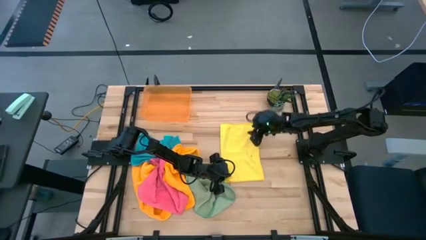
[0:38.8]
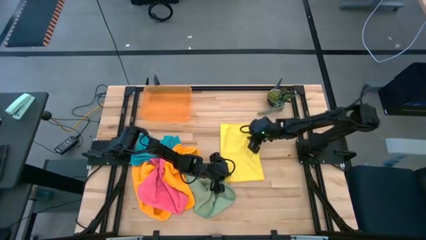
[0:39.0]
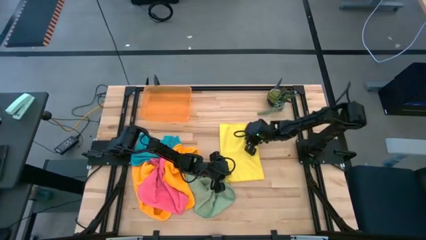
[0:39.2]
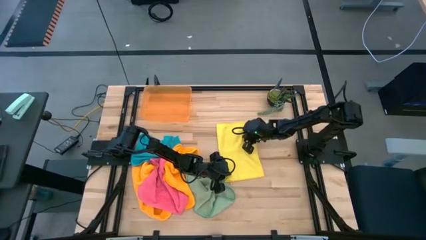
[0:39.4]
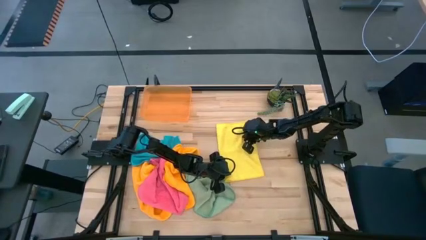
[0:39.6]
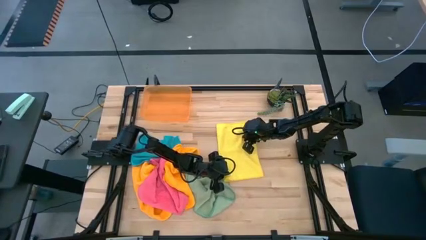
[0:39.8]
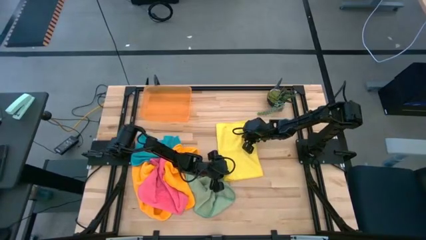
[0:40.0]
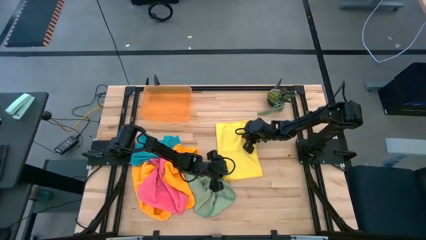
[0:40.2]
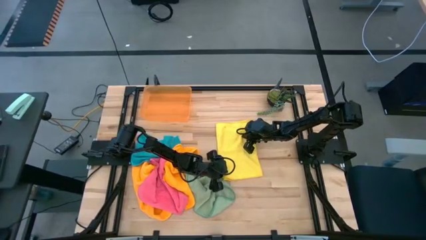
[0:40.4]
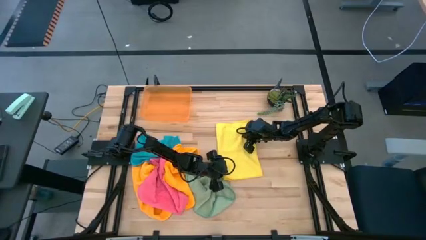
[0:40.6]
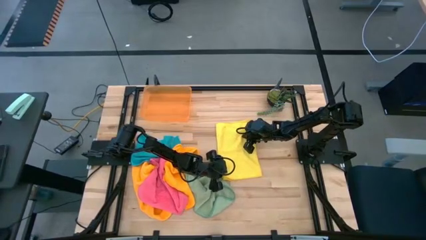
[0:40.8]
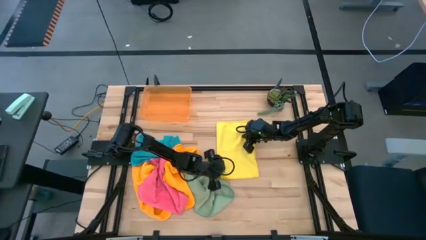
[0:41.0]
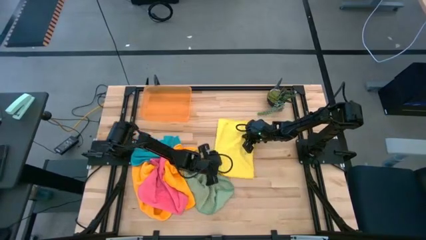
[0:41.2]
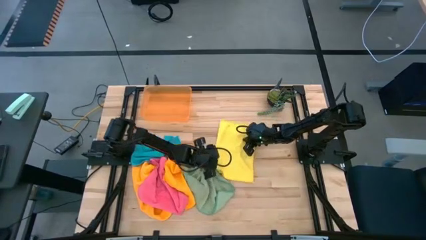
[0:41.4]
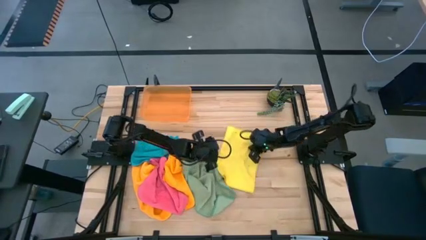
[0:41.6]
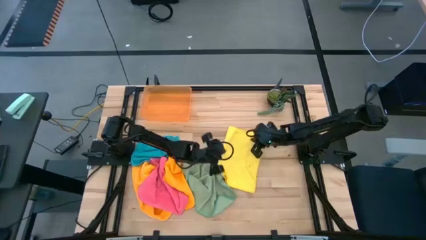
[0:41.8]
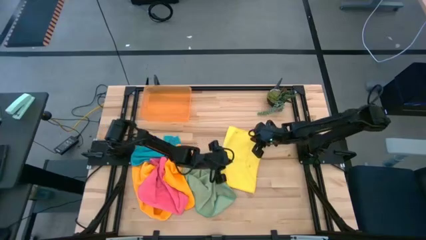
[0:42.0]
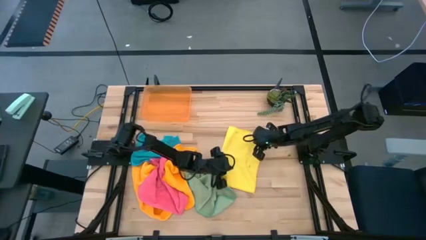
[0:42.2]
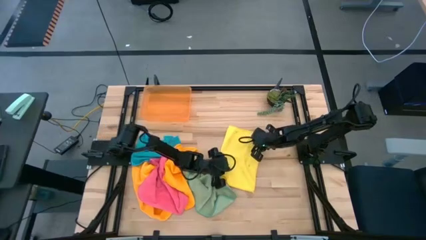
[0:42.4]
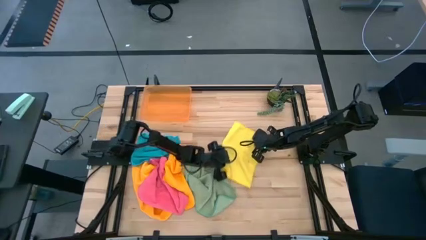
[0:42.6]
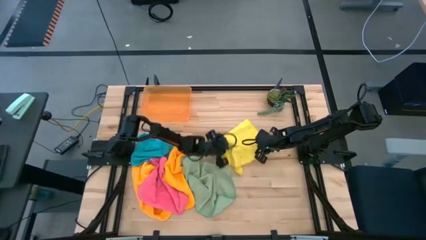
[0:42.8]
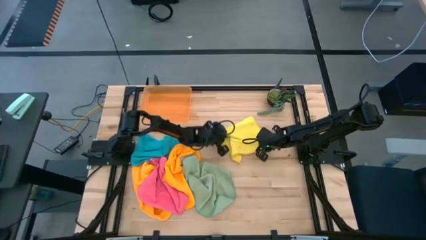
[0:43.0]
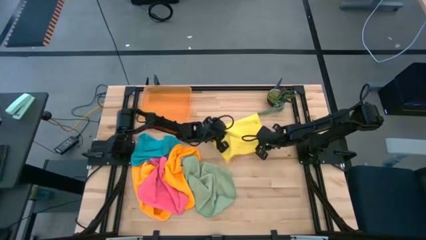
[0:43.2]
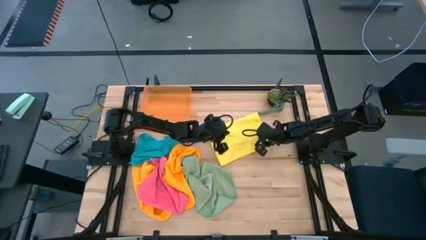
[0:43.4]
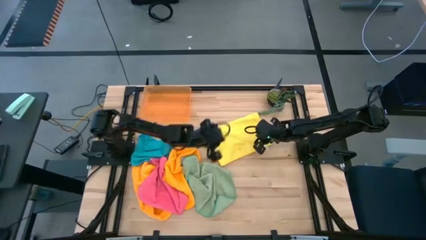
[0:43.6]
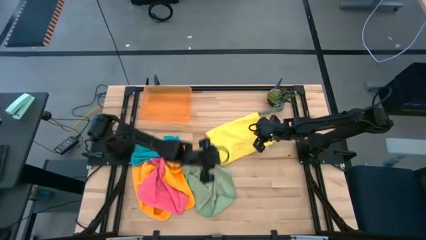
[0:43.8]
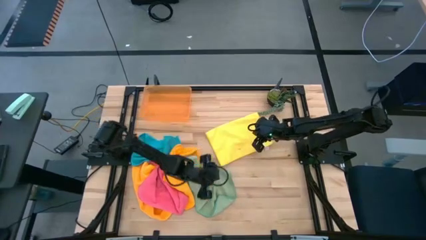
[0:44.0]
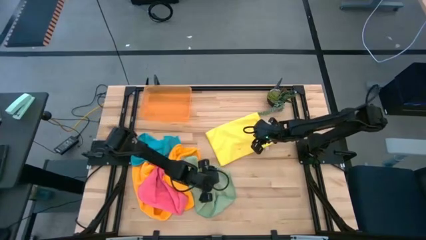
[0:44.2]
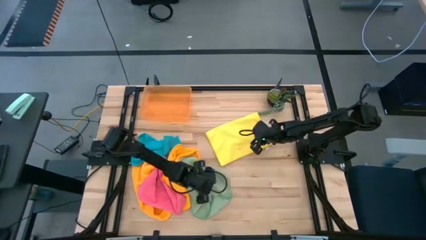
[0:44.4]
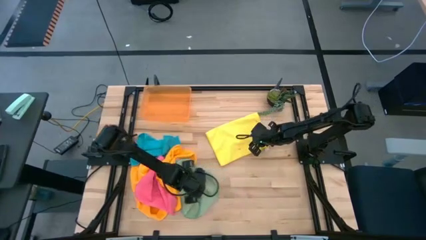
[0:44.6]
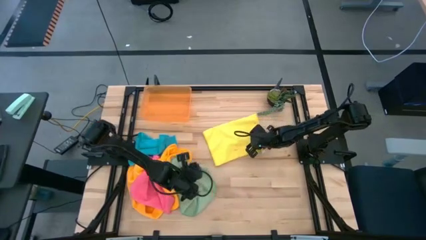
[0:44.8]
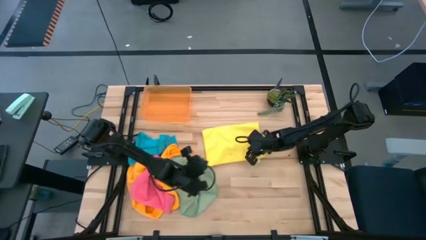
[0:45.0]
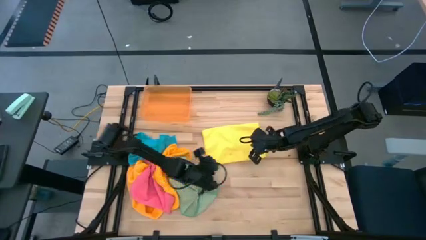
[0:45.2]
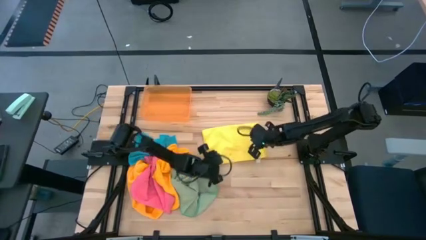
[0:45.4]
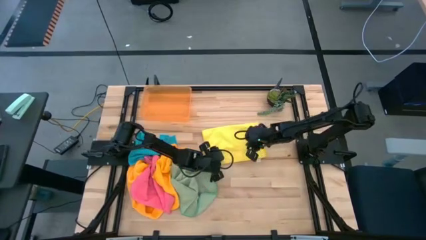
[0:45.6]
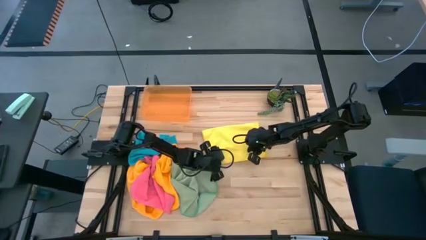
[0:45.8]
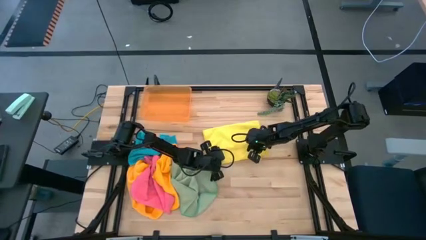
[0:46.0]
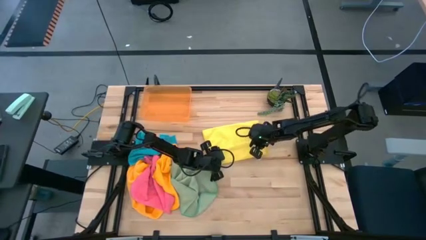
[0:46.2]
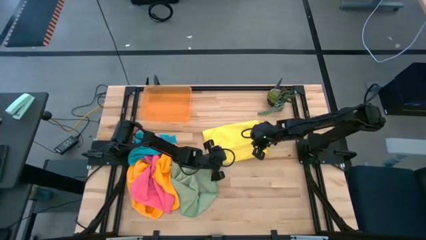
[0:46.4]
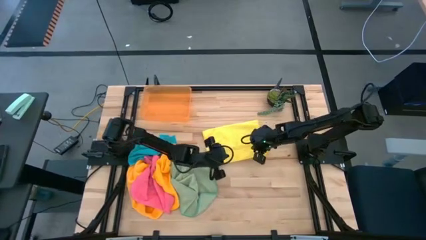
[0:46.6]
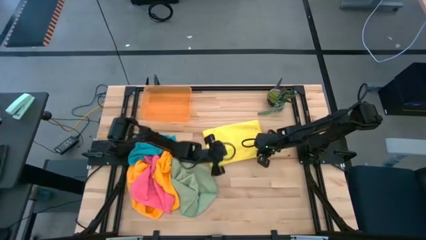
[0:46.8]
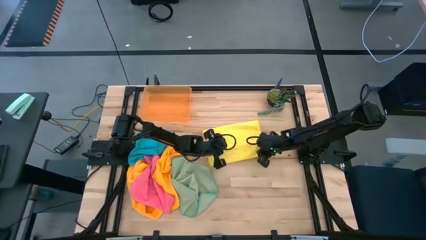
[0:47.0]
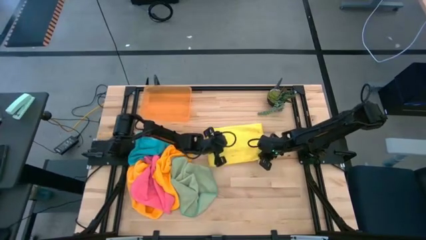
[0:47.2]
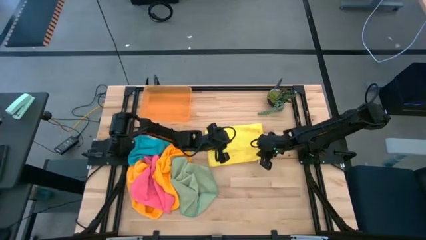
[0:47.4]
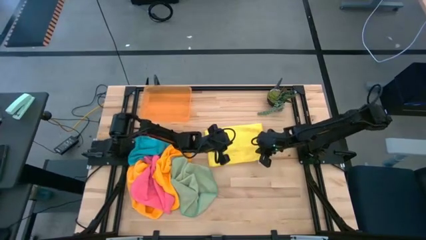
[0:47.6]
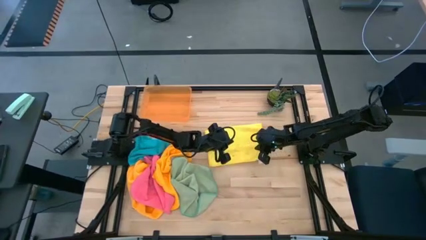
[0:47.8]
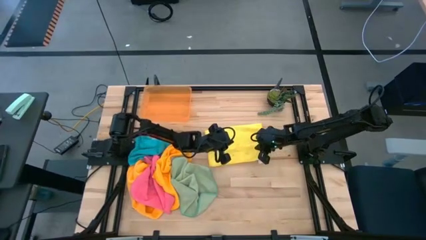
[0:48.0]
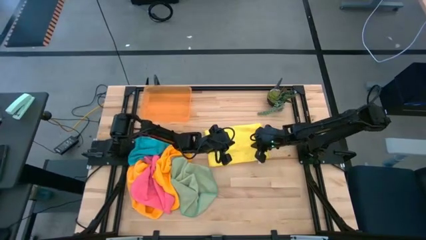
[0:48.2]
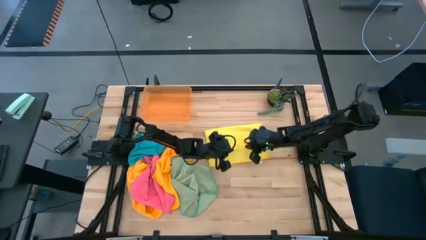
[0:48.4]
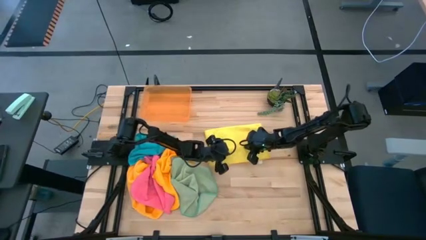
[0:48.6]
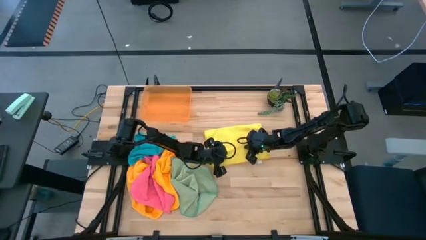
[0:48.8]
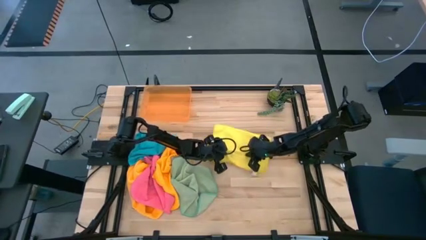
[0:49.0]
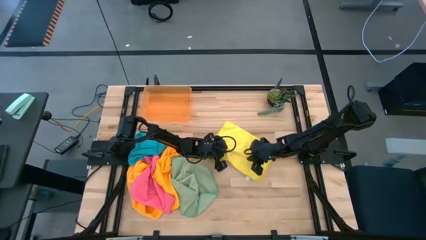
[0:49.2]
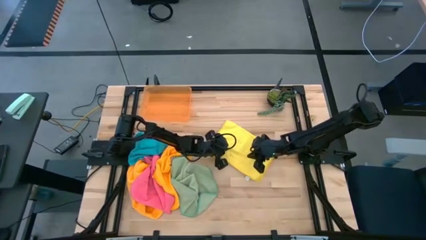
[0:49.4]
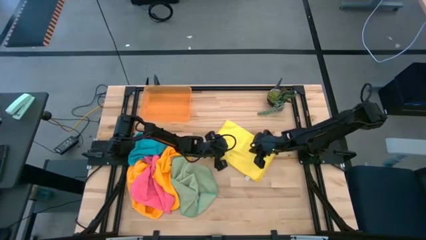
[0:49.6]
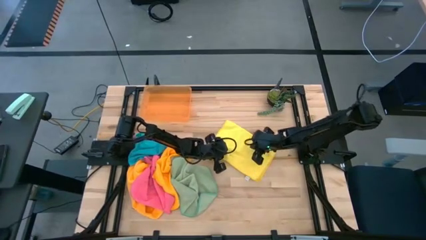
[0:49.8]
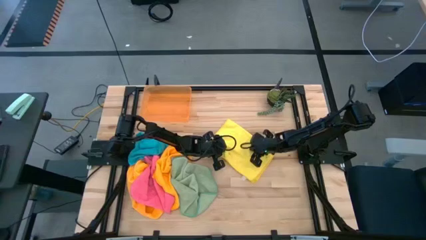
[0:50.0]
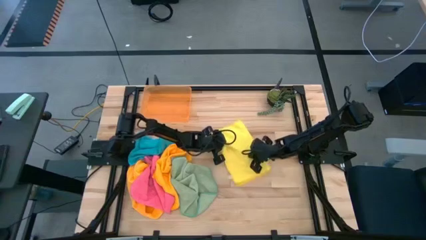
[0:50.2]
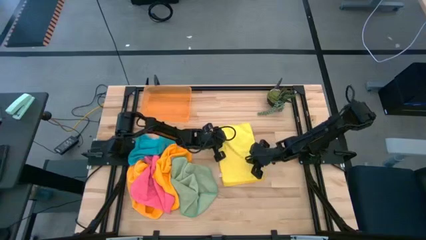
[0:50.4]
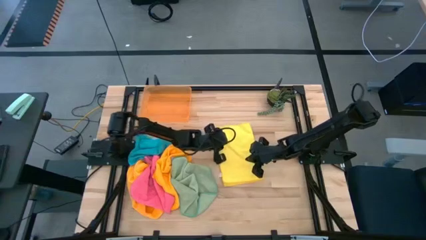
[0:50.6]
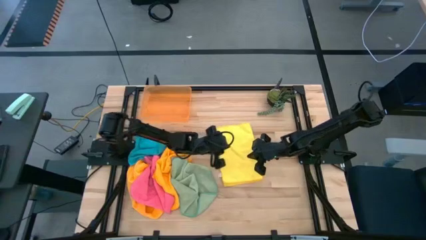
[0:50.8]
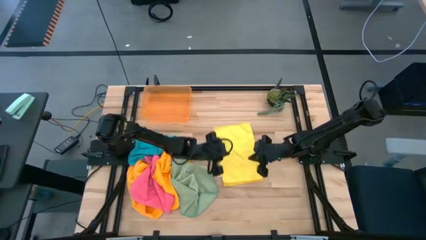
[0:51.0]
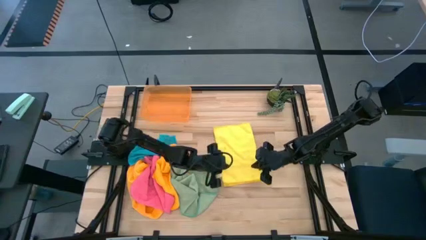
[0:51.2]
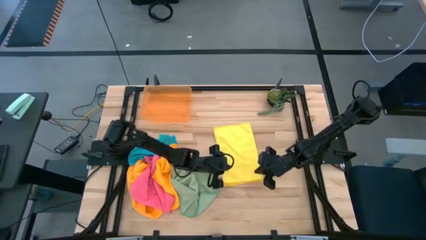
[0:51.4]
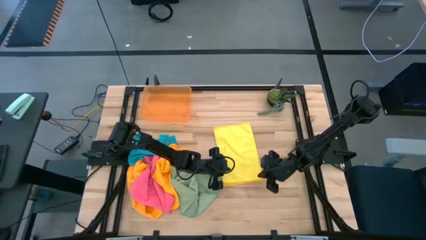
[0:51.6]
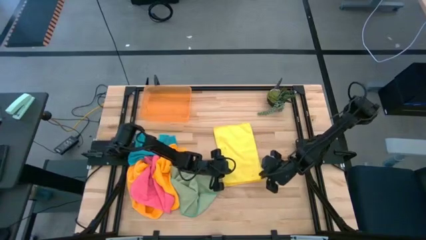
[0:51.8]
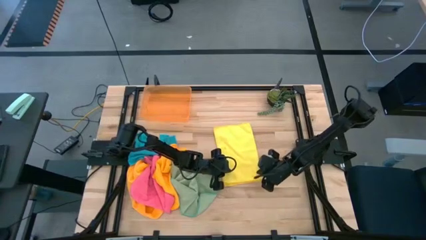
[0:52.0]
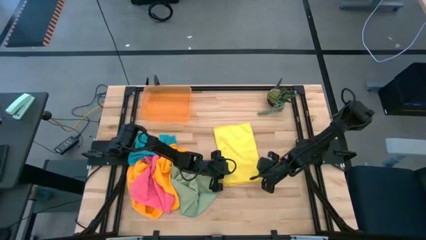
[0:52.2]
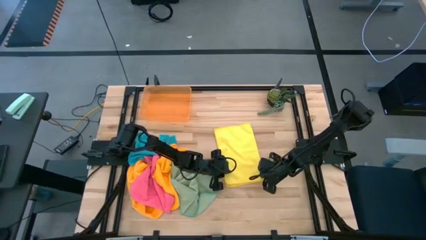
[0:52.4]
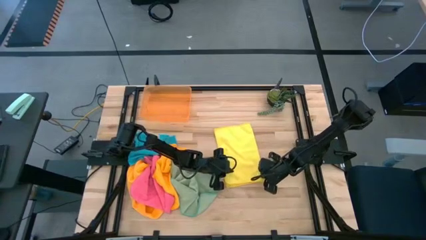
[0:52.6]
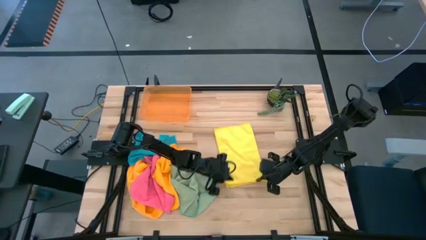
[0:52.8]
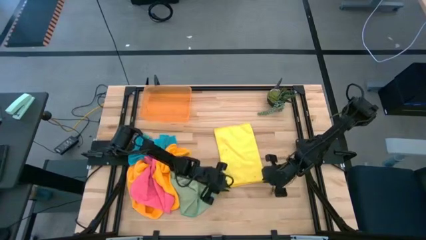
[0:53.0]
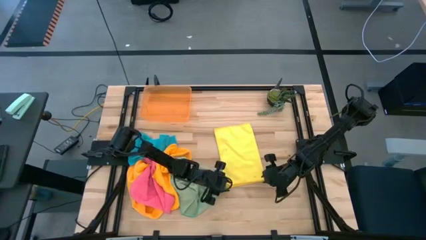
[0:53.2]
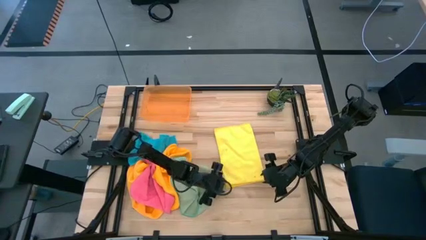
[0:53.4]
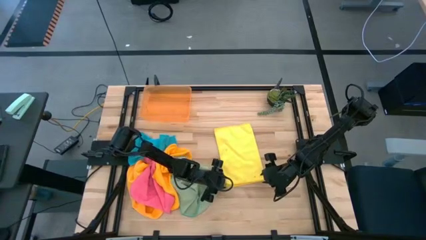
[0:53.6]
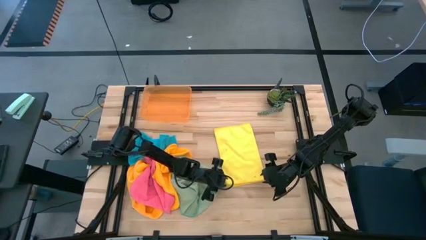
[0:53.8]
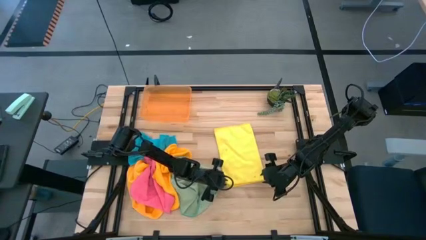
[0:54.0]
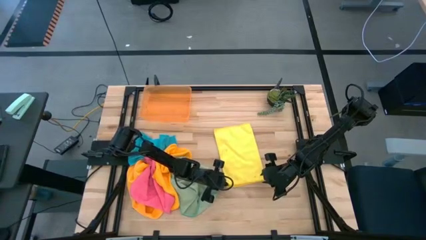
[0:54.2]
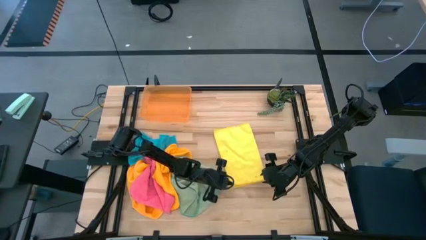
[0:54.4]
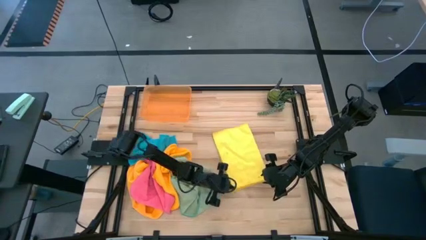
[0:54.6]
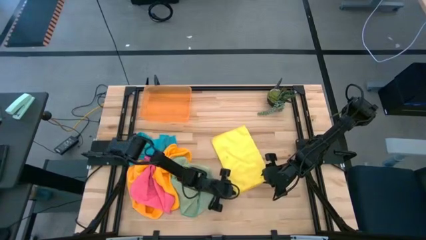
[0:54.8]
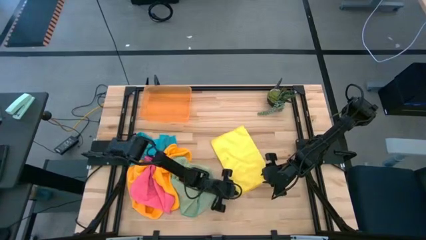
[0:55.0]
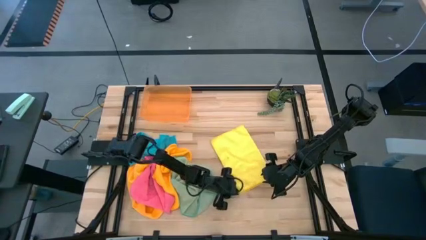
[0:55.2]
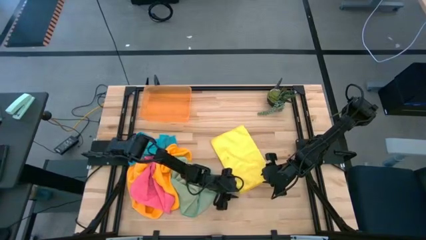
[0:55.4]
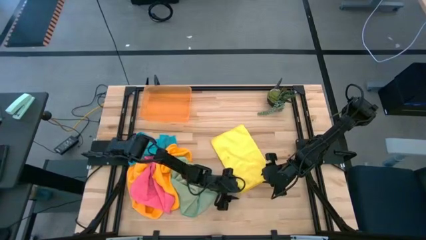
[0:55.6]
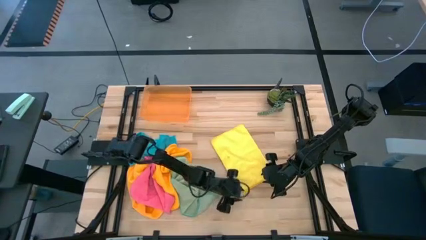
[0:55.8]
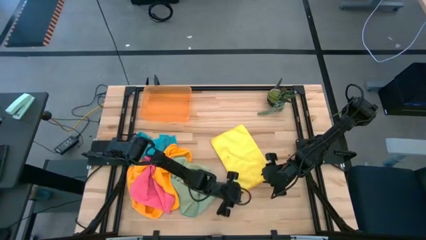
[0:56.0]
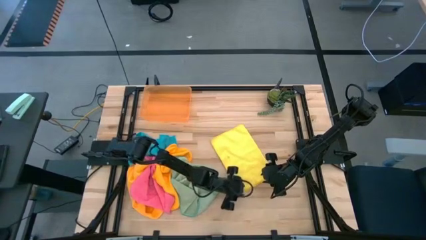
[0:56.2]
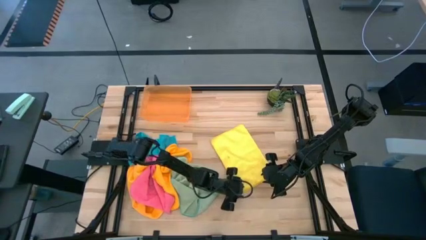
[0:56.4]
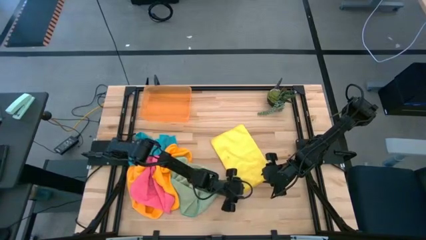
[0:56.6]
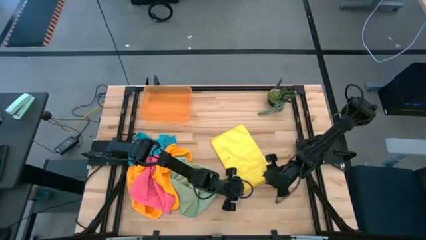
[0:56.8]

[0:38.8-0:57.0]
Task: Fold microfiber towels
Fold the yellow towel
